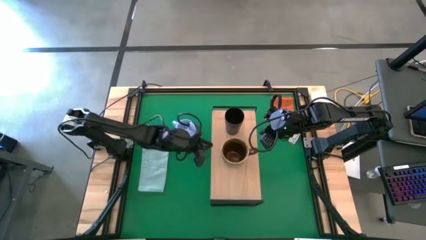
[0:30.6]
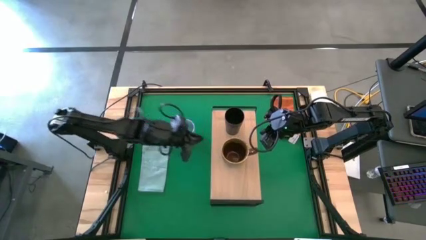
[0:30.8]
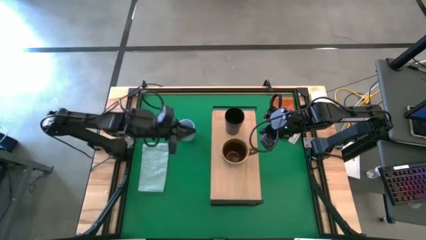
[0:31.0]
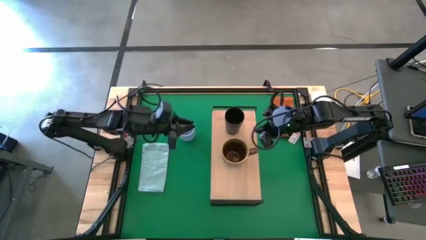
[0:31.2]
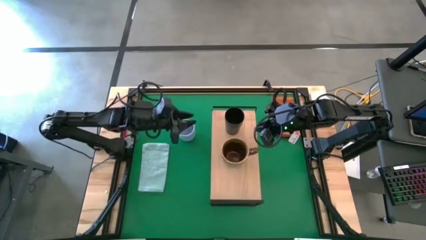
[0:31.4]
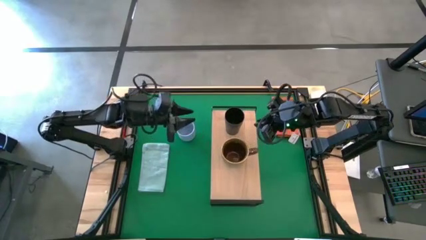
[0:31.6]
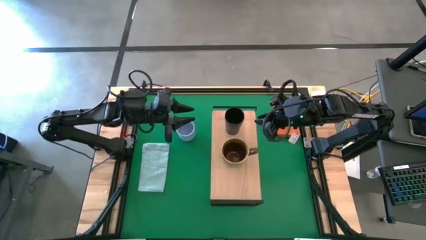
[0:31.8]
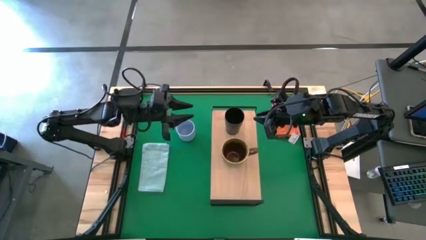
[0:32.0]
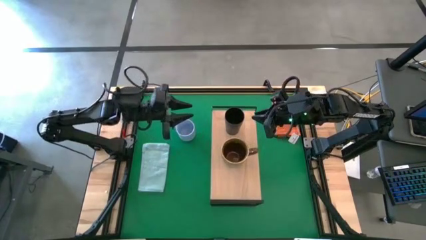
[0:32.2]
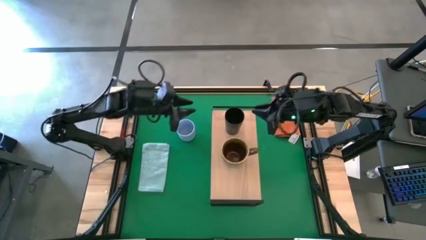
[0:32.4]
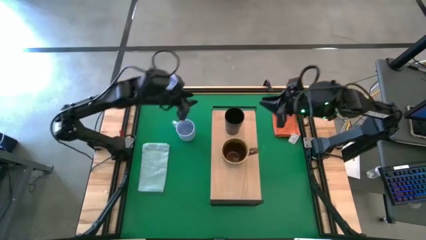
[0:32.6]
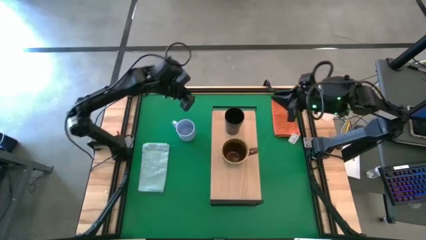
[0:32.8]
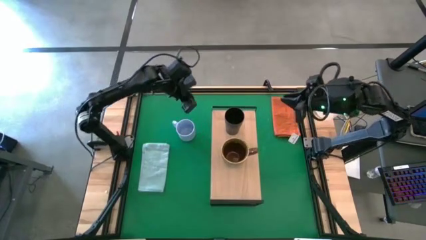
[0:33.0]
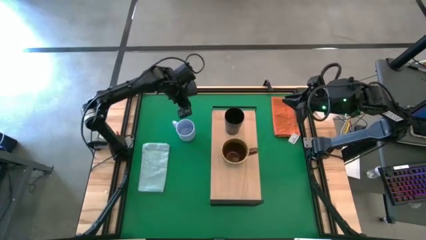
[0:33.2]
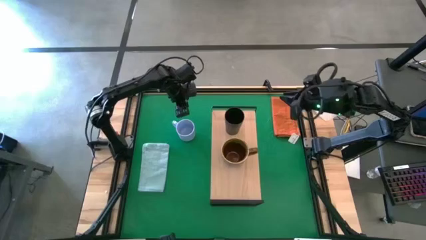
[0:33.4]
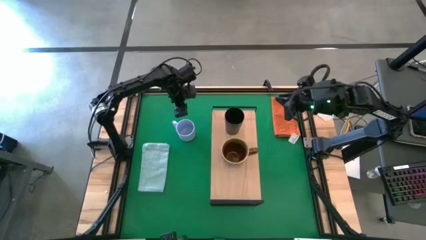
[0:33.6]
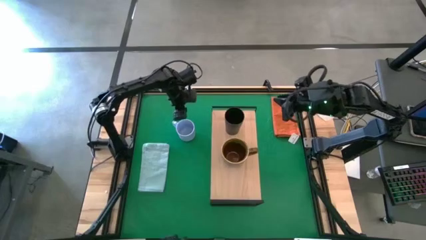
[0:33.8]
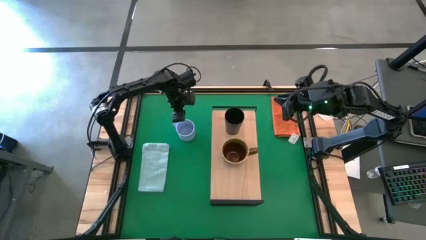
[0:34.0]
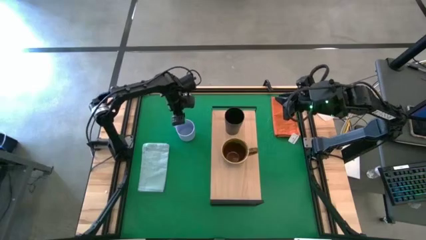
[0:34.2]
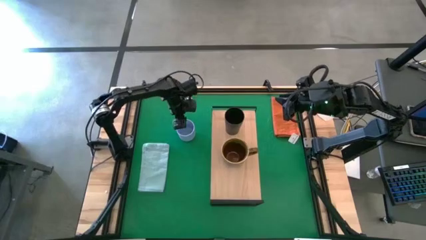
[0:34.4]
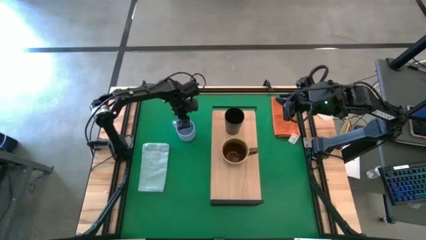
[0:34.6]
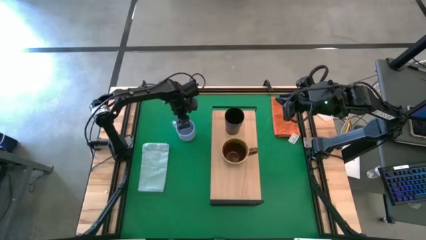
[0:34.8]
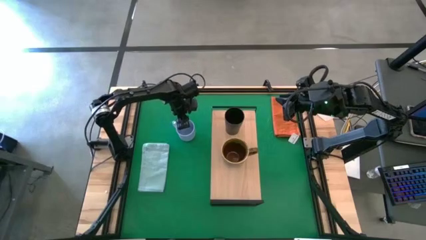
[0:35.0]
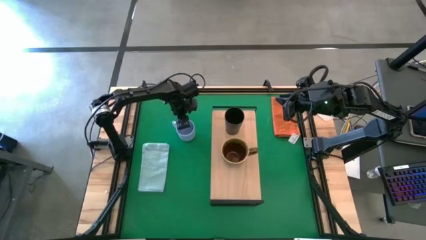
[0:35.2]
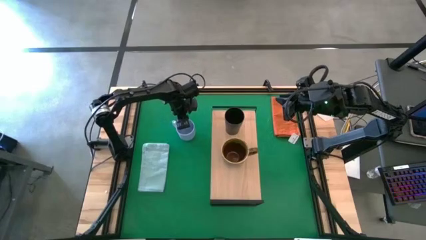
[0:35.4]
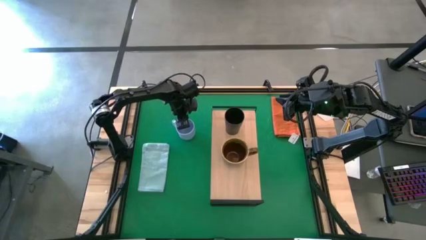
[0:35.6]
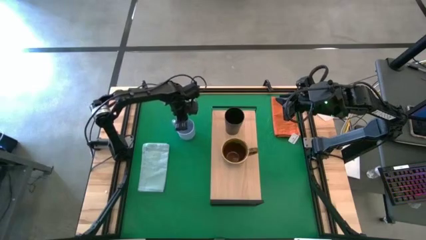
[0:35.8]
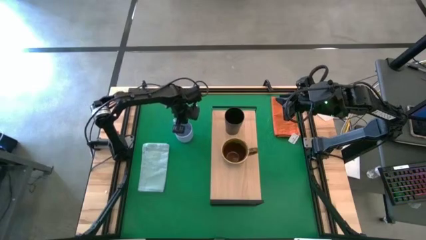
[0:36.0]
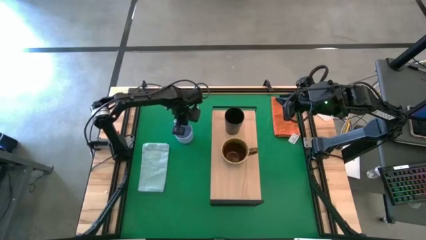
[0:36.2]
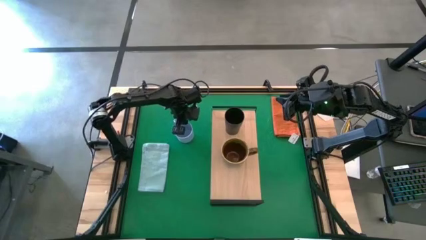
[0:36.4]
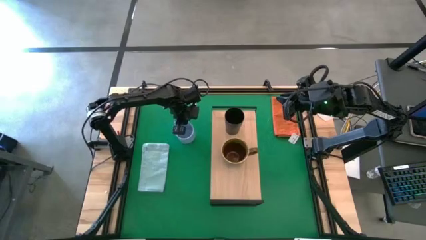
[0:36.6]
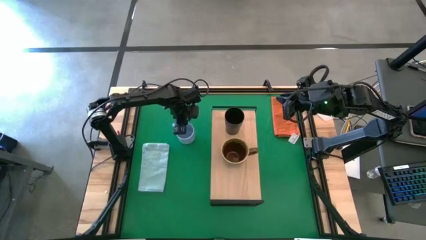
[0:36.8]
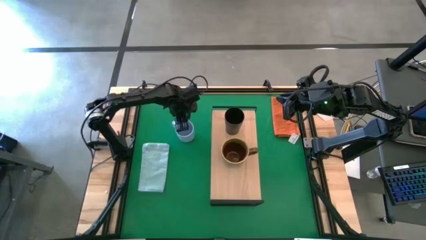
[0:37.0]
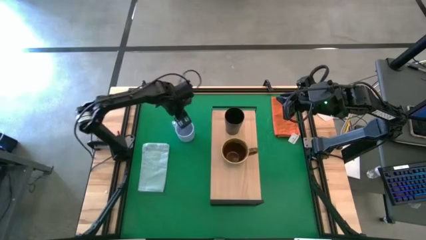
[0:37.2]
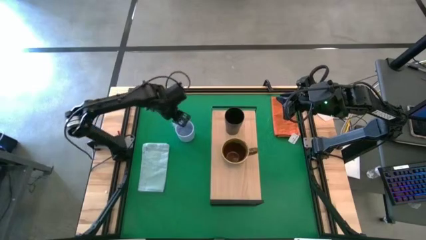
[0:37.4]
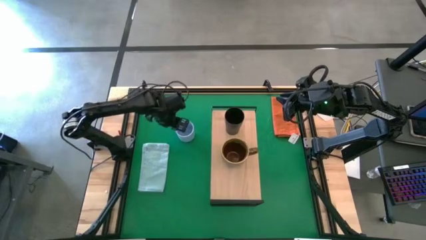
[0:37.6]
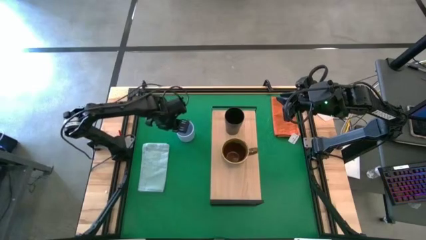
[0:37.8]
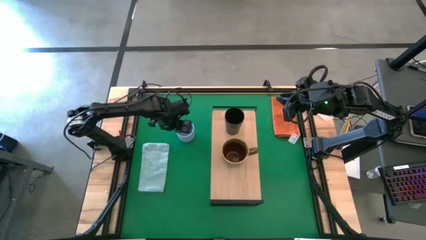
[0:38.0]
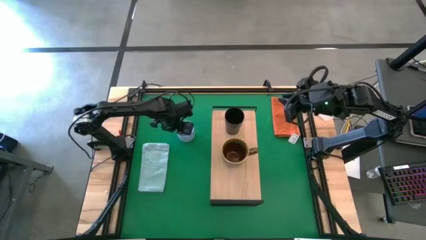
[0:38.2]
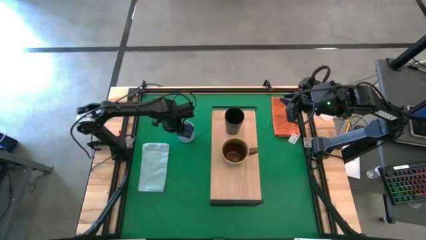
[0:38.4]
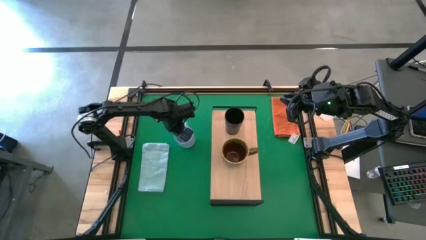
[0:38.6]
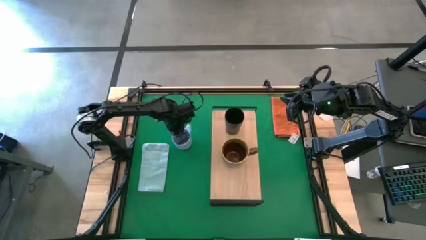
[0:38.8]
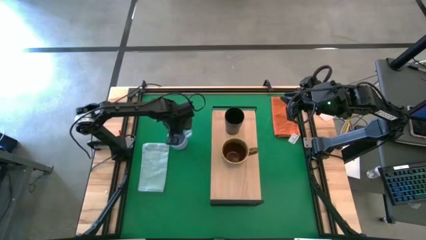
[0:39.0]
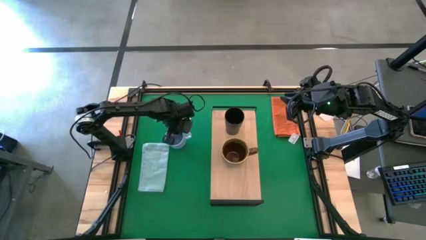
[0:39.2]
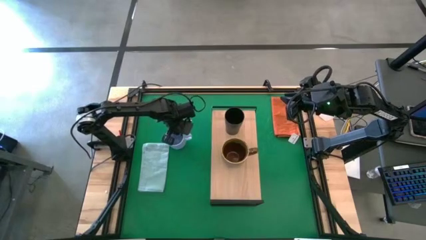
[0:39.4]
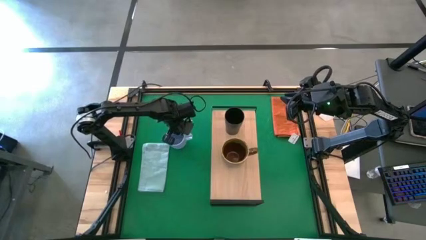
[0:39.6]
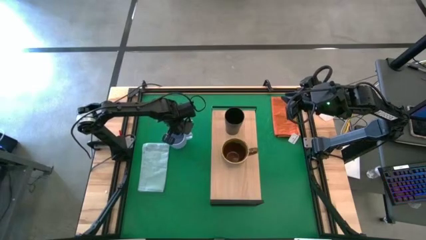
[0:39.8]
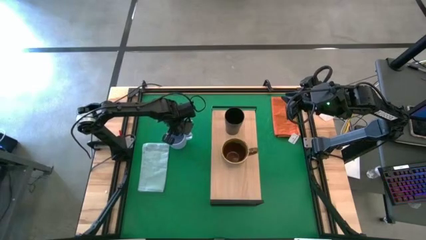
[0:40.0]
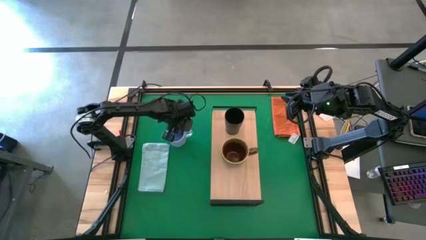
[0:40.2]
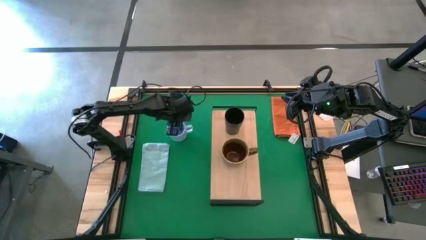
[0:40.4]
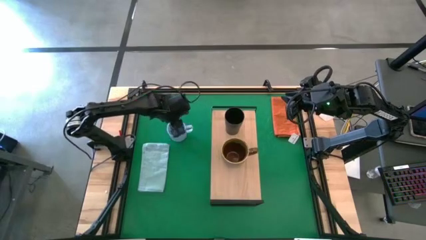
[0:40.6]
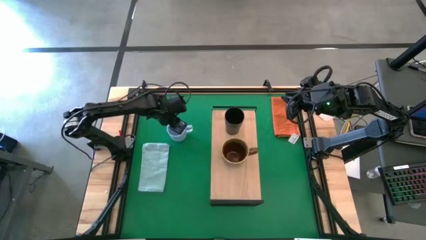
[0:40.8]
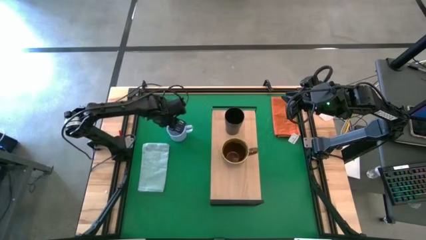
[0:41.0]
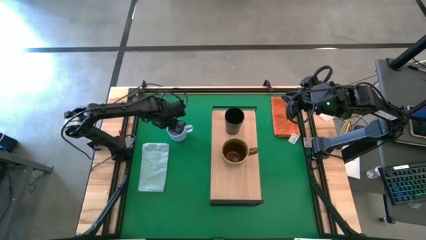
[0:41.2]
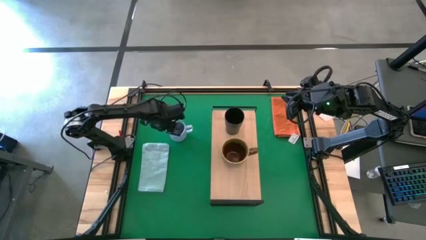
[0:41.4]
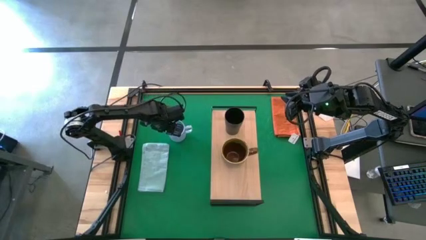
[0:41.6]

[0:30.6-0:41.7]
Task: Stack small to large cups/mugs on shelf
Put the blue cup on the shelf aligned with the green cup

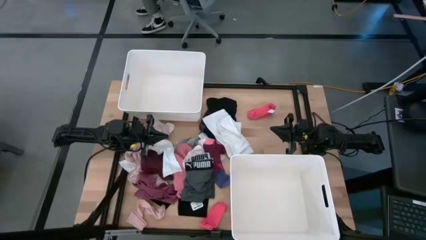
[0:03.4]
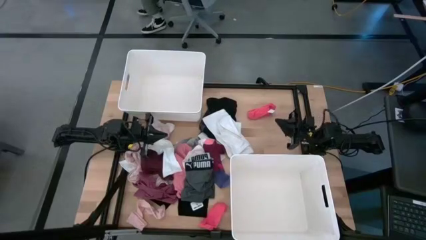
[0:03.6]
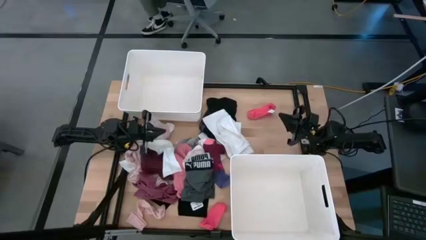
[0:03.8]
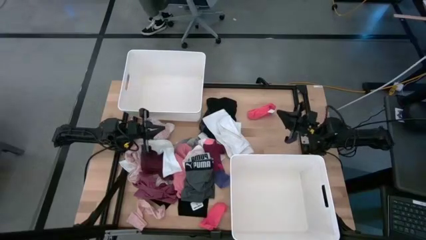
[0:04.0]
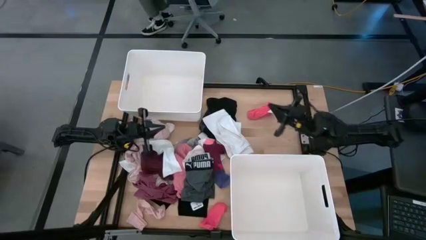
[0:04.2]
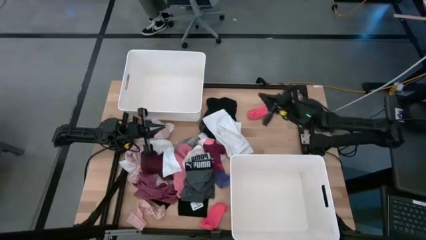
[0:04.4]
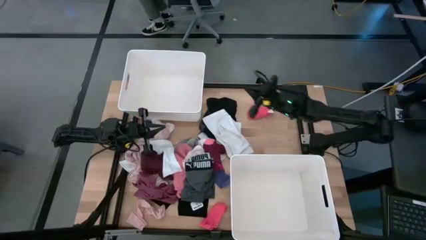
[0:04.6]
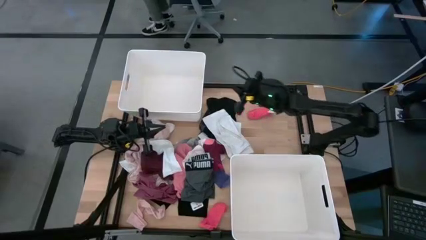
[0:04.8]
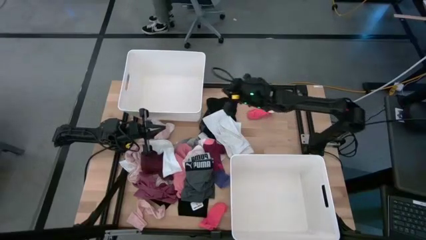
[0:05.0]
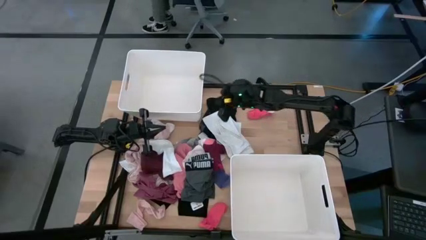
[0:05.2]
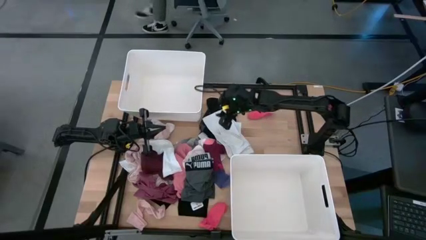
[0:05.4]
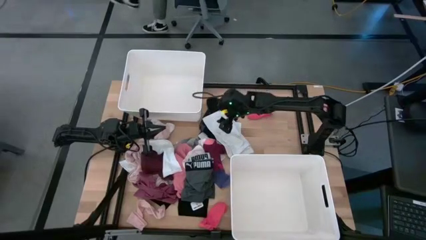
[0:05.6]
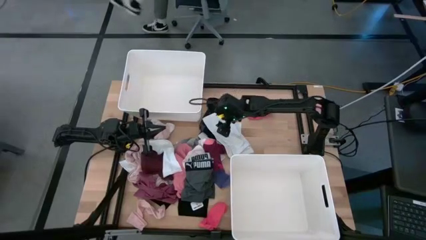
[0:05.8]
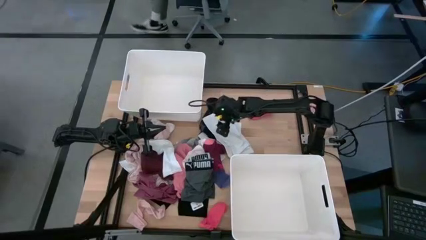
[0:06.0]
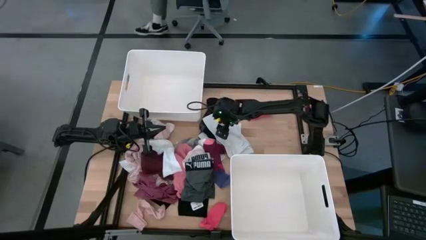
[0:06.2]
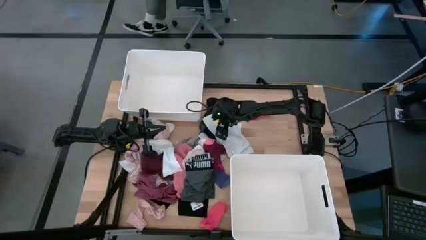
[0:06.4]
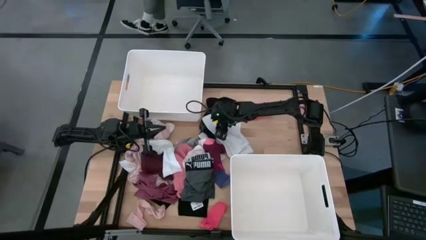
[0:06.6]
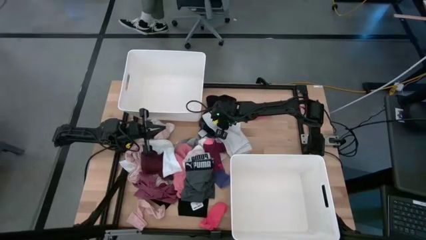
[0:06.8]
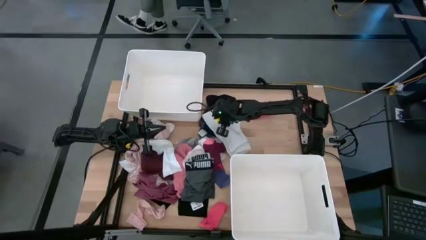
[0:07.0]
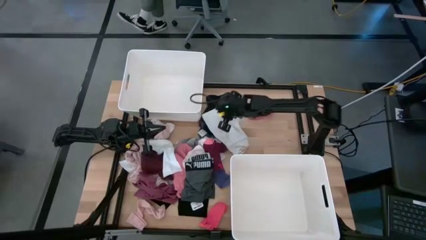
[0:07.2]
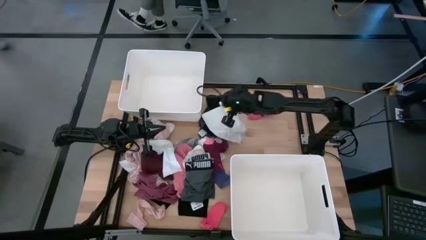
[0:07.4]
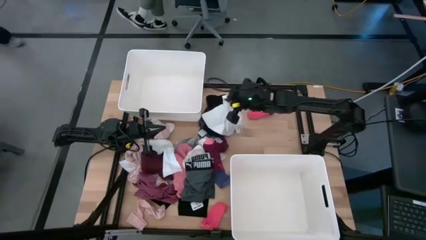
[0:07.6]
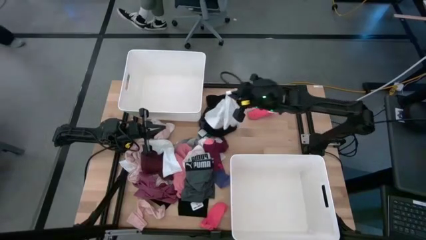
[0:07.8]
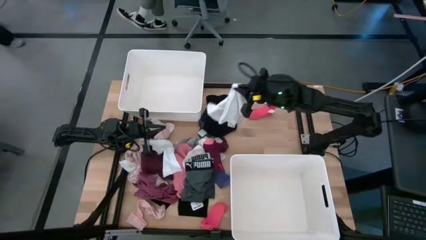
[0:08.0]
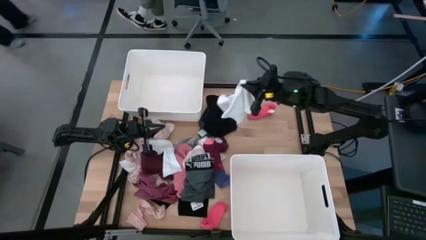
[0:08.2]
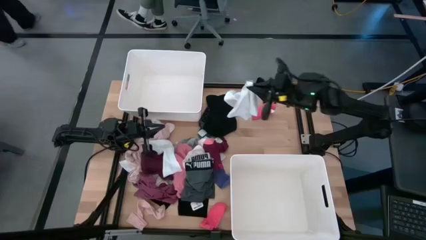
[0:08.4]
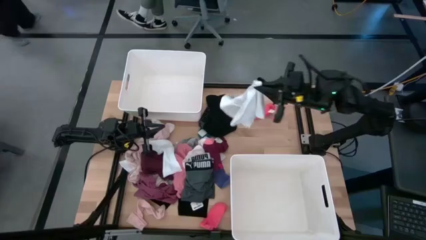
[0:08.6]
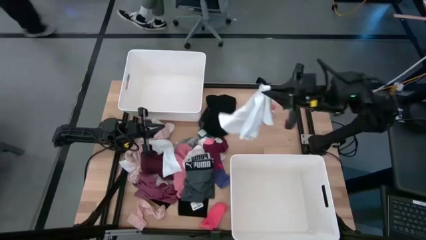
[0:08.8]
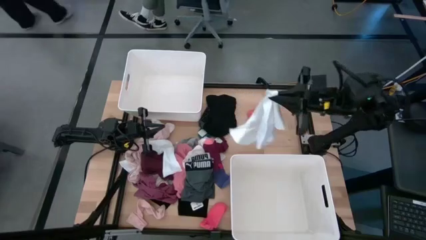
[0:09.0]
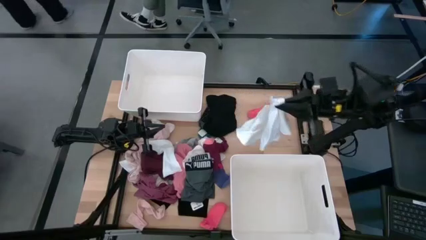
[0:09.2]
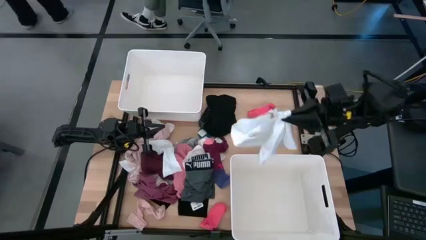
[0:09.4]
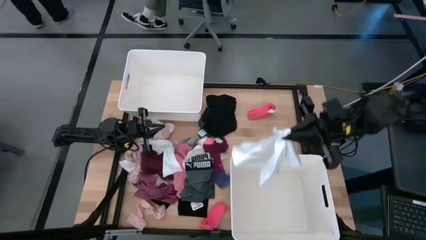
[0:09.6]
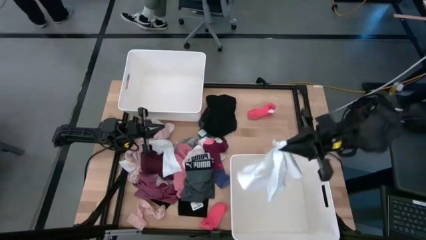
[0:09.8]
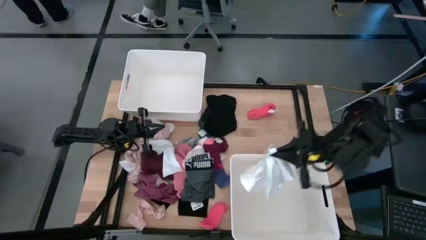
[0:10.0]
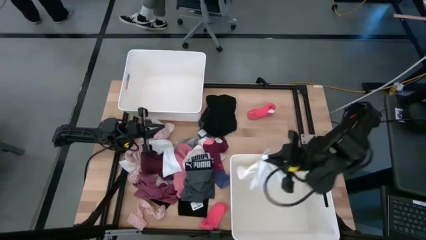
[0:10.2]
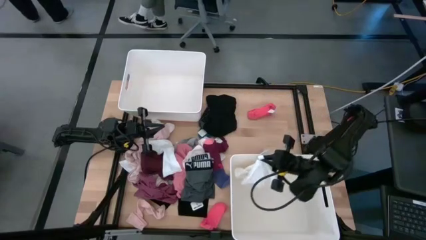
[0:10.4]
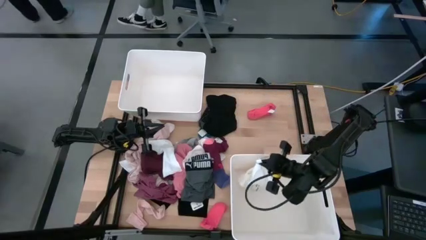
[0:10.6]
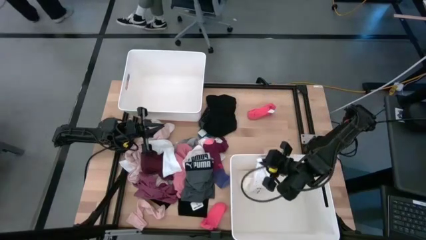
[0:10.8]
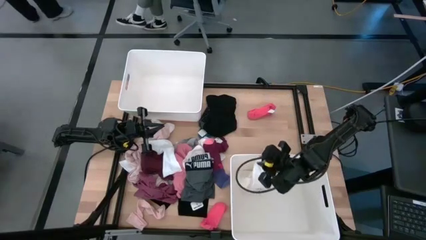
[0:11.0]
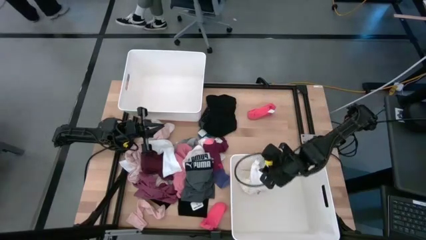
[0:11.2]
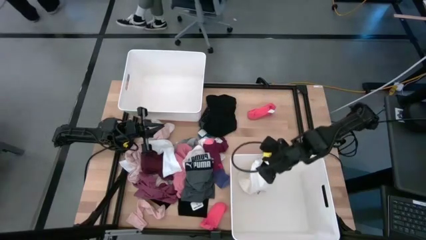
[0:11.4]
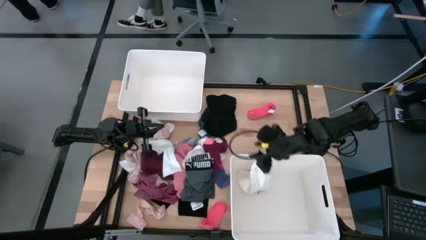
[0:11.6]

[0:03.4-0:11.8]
Task: Sort clothes
Put the white underwear into the bottom white bin
